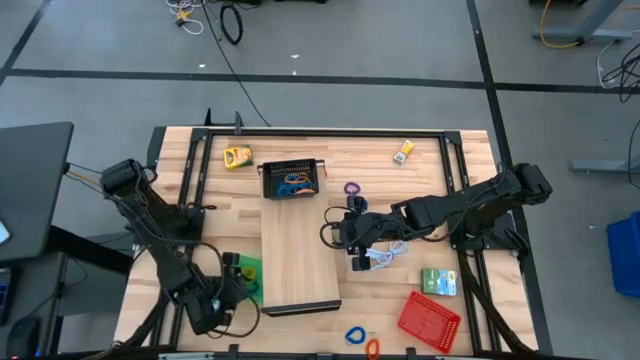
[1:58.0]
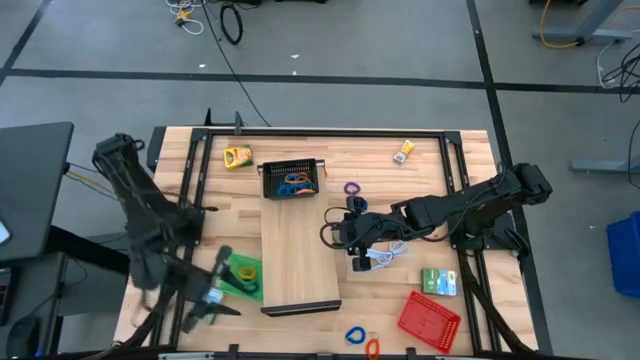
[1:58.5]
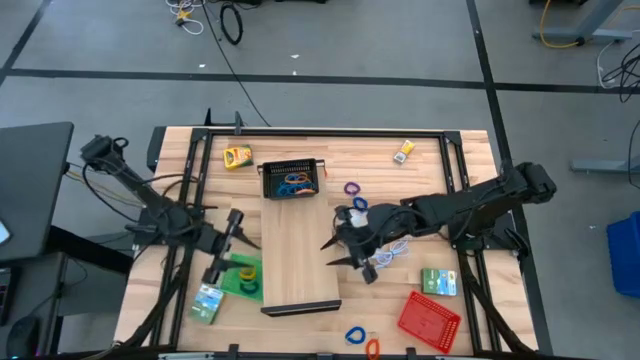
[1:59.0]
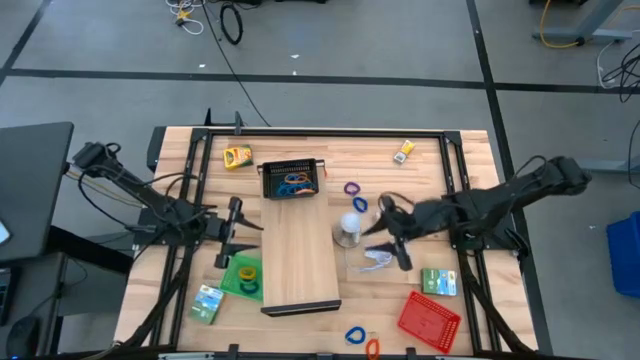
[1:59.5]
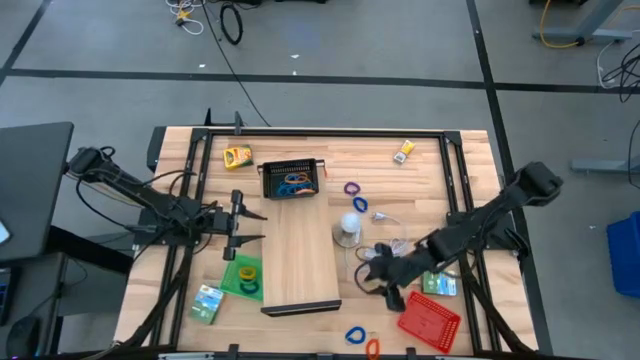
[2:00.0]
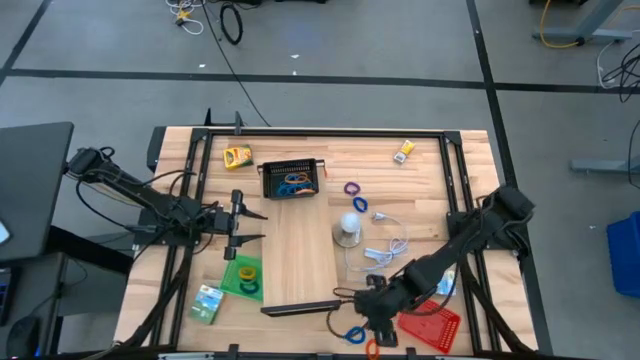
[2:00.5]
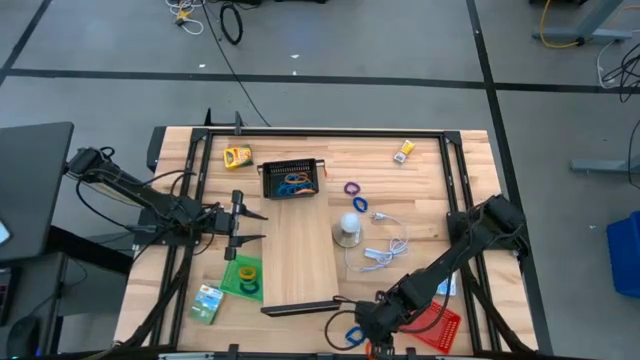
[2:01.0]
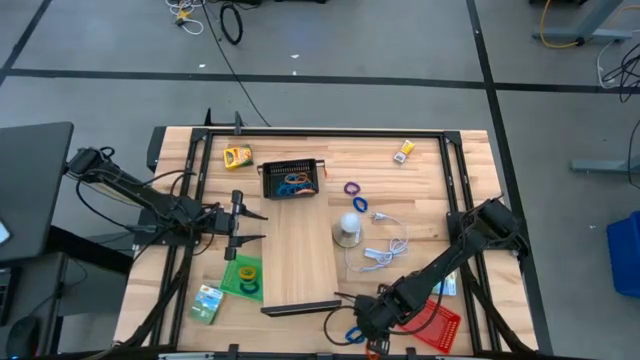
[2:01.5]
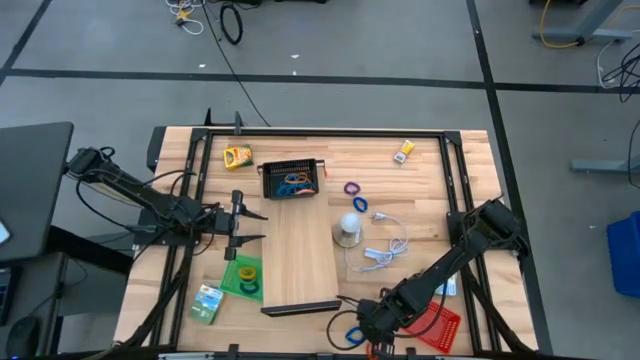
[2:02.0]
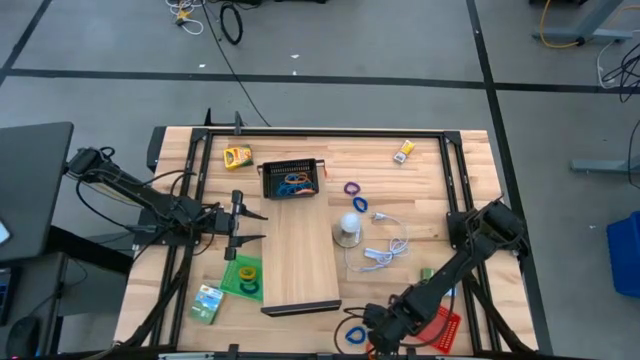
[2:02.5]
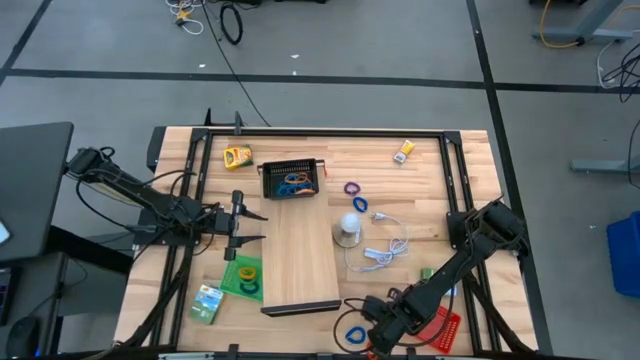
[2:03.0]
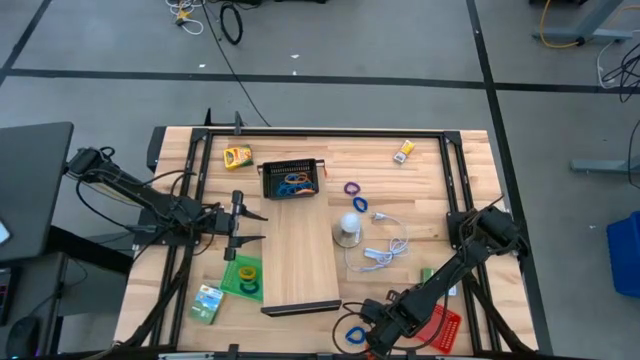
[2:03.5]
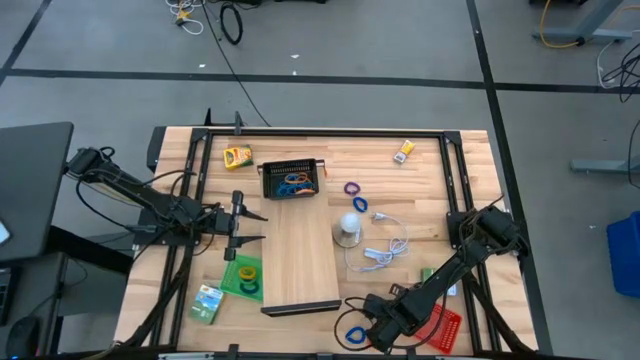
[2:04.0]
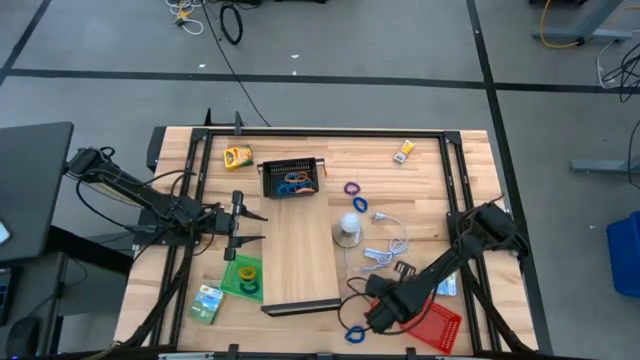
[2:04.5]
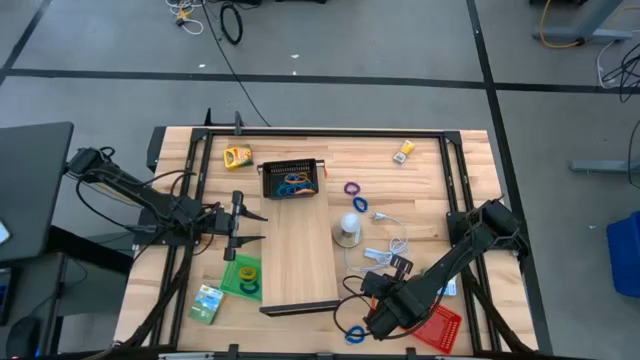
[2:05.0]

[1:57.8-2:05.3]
Task: Pick & Place Office Desk Supplies
Put the bottom orange spiral keychain into the green bin

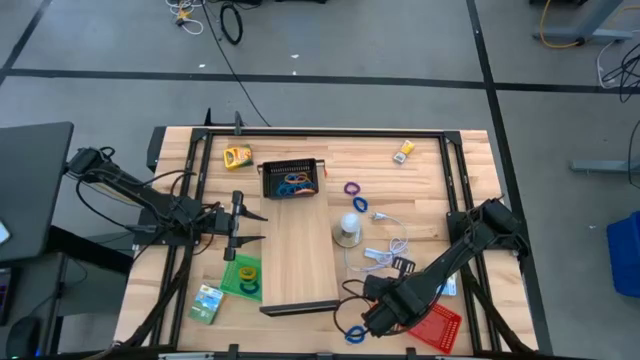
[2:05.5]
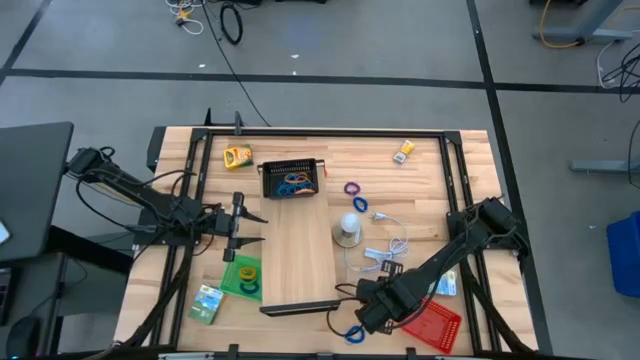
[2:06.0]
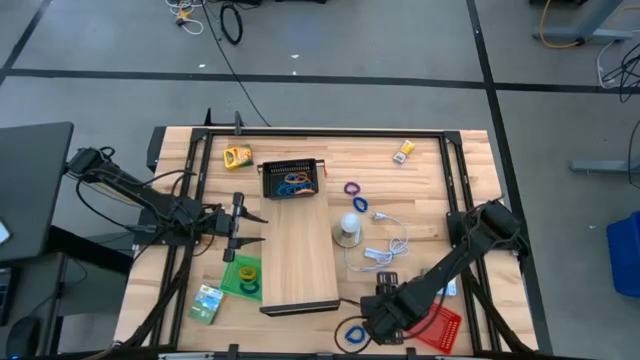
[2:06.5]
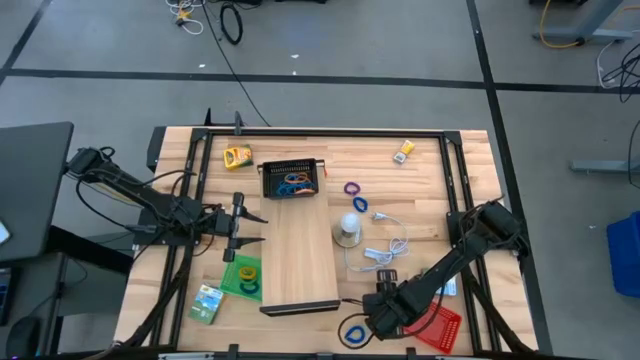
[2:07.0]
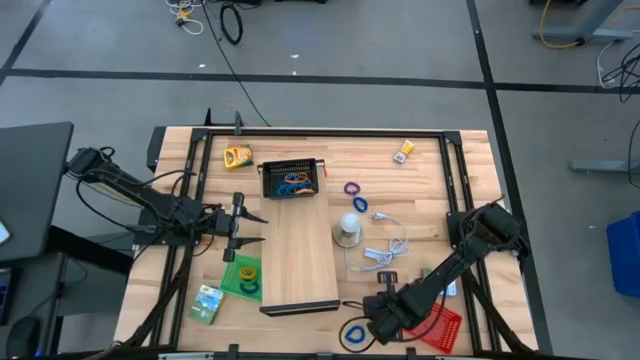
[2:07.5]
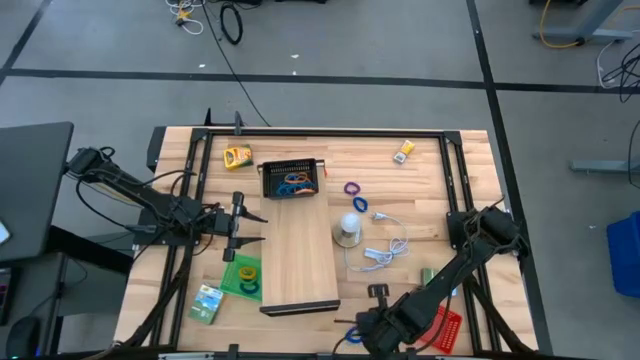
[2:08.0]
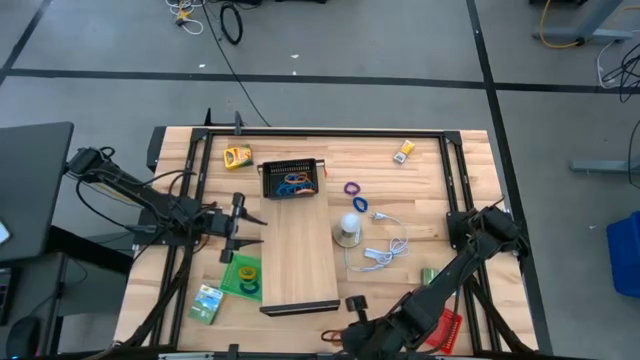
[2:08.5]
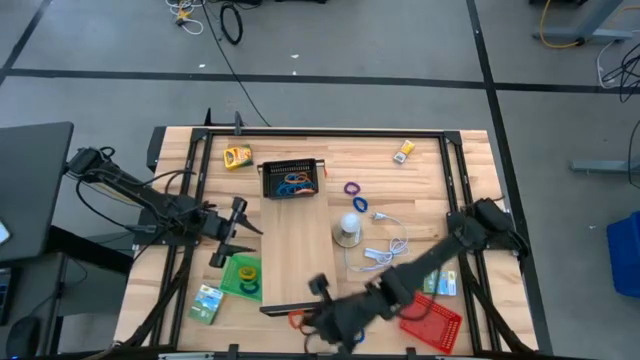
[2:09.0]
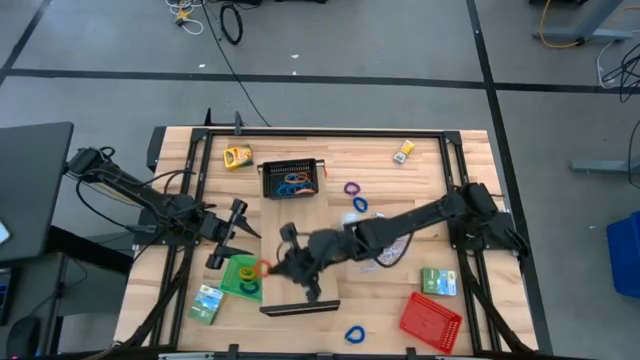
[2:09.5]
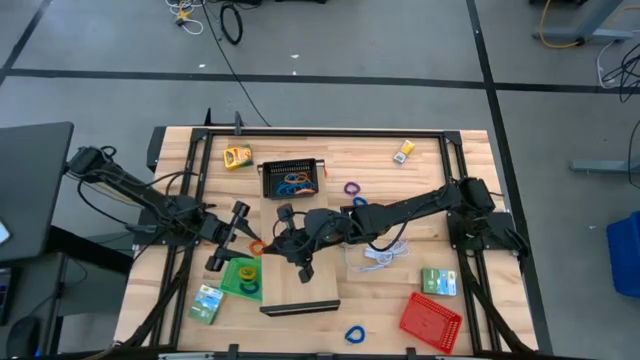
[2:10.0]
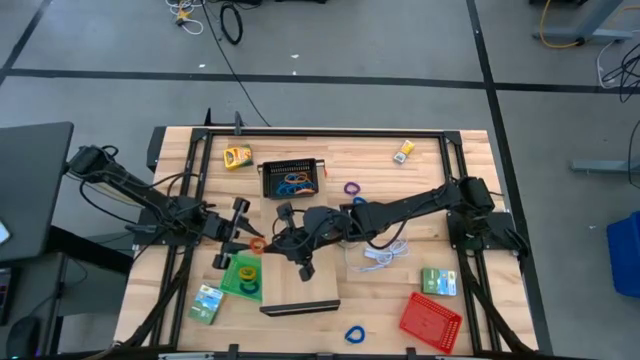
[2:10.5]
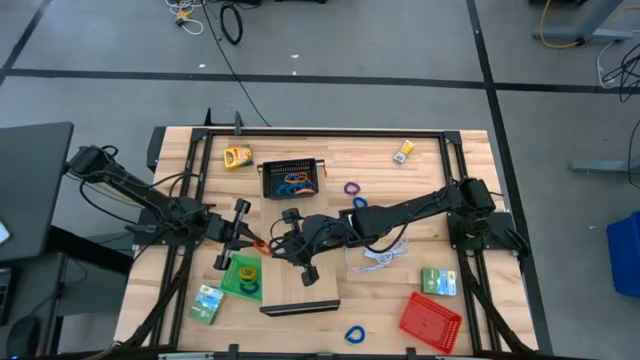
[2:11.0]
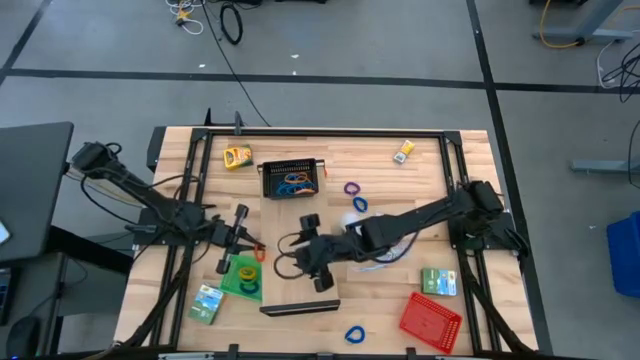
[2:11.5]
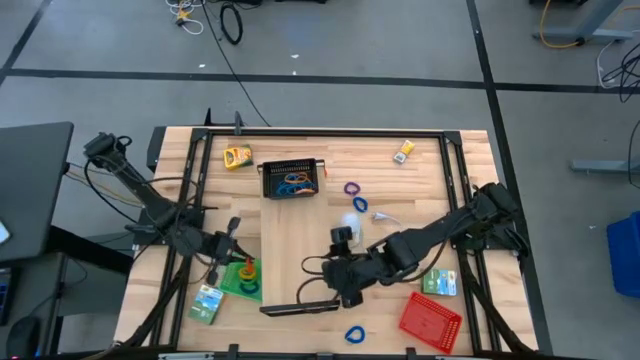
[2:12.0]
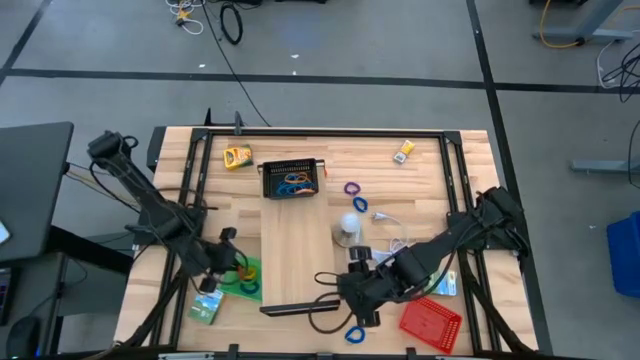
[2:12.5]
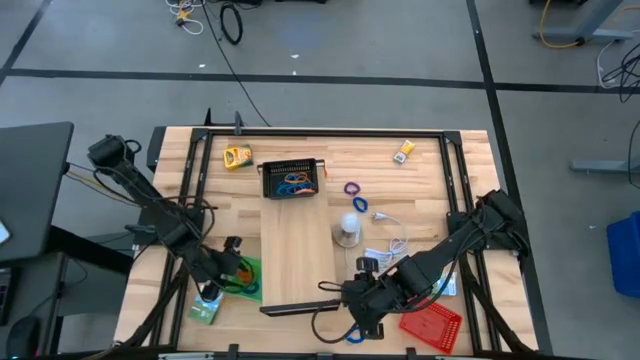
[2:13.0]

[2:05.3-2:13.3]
Put the bottom orange spiral keychain into the green bin

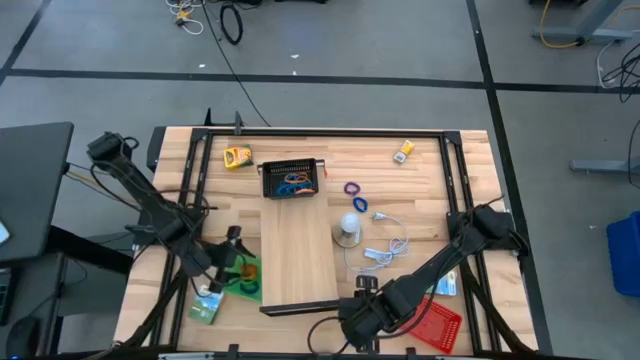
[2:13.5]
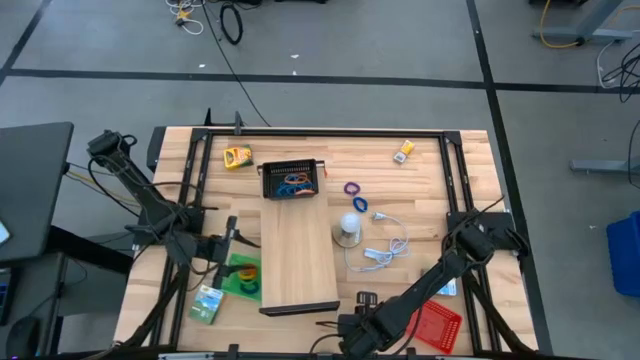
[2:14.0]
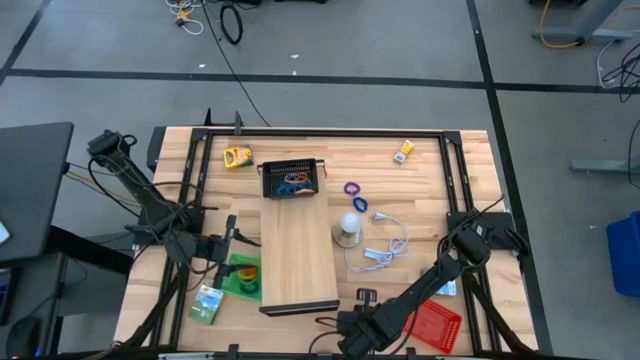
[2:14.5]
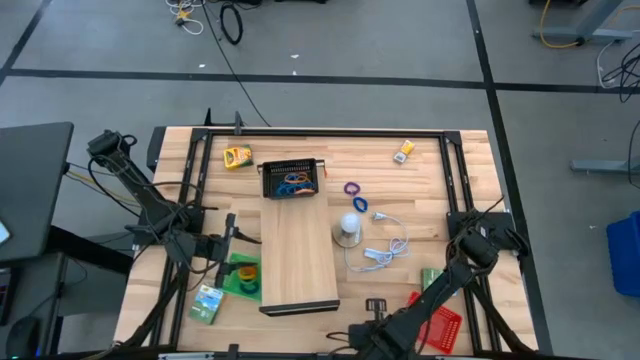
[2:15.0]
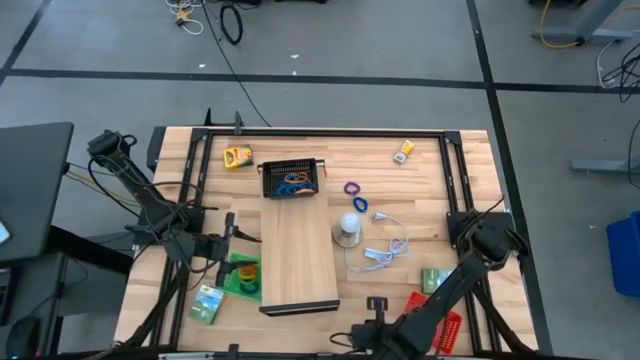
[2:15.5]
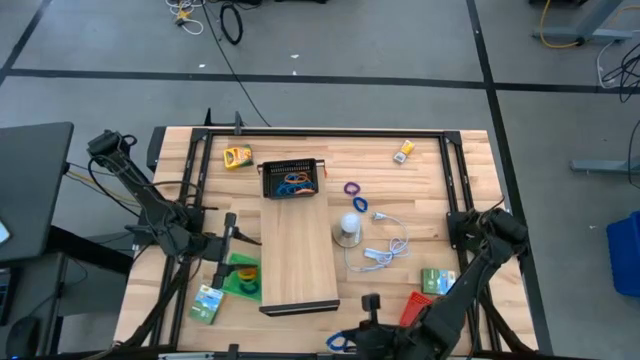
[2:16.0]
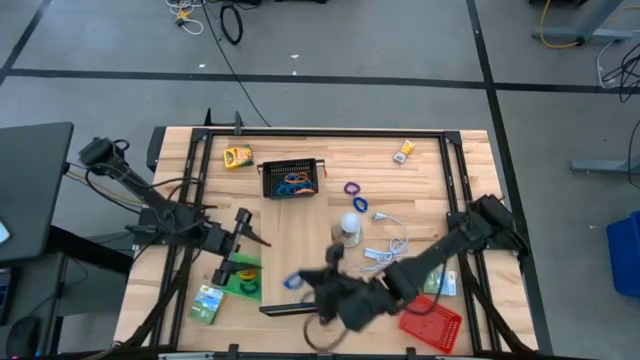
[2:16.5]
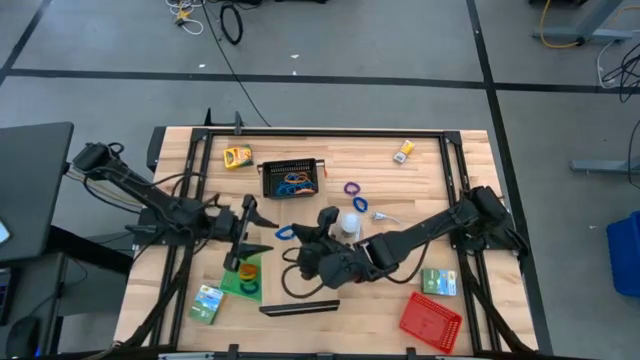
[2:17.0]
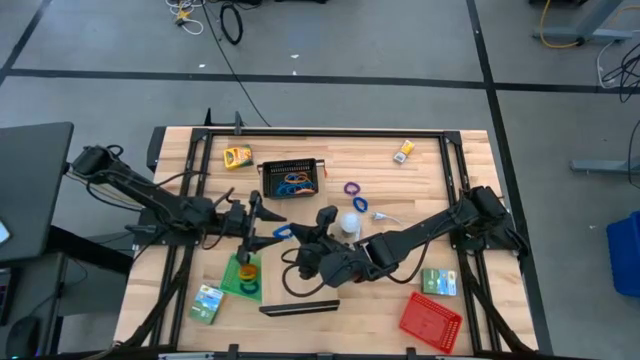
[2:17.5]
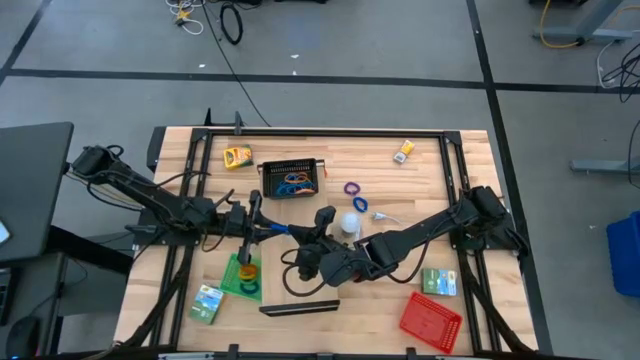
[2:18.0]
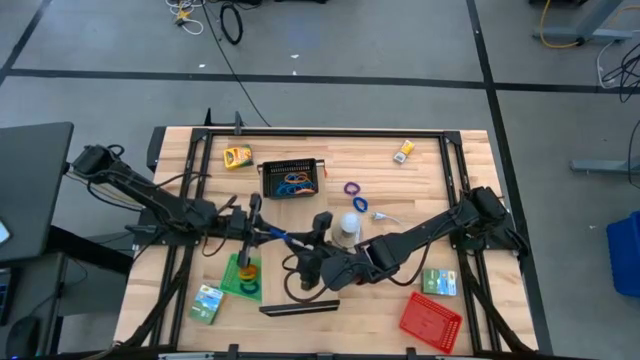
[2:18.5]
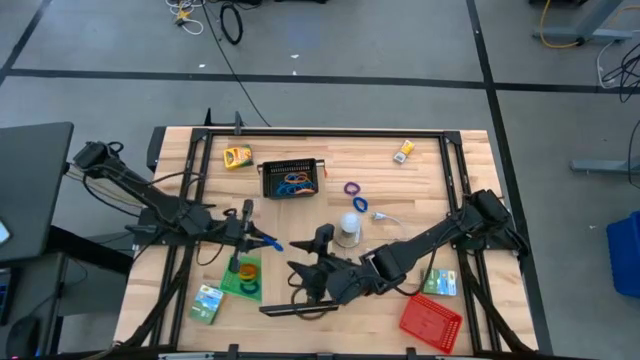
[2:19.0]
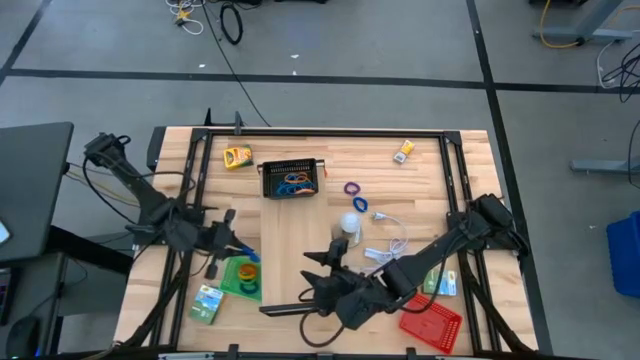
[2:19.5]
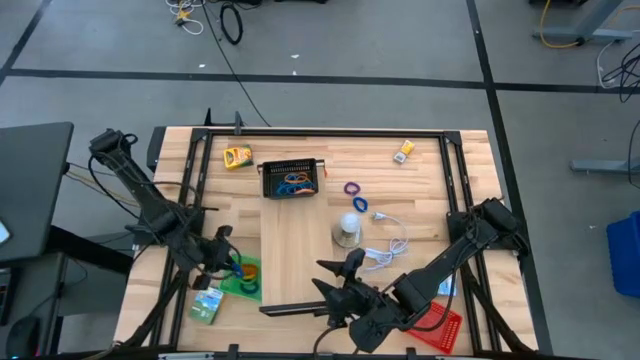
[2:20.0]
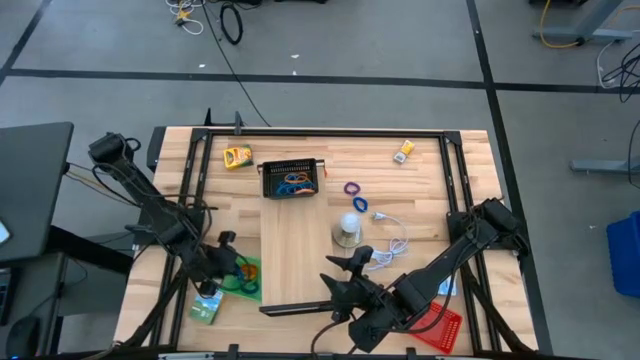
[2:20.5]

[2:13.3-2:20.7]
Put the bottom blue spiral keychain into the green bin
